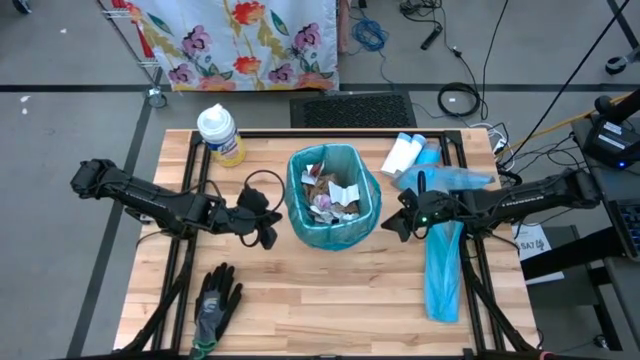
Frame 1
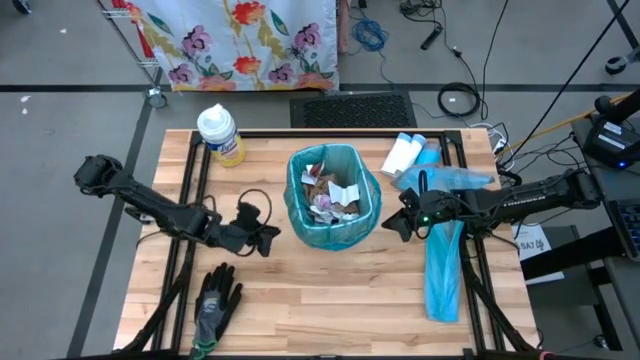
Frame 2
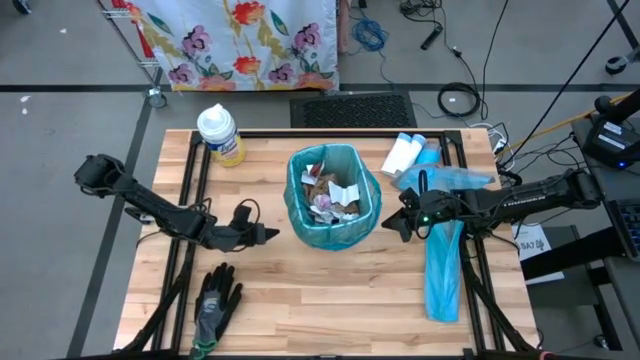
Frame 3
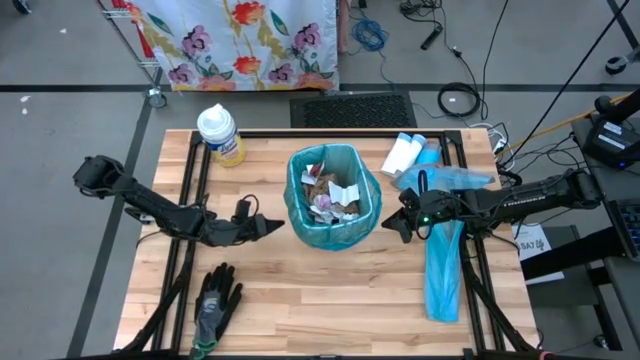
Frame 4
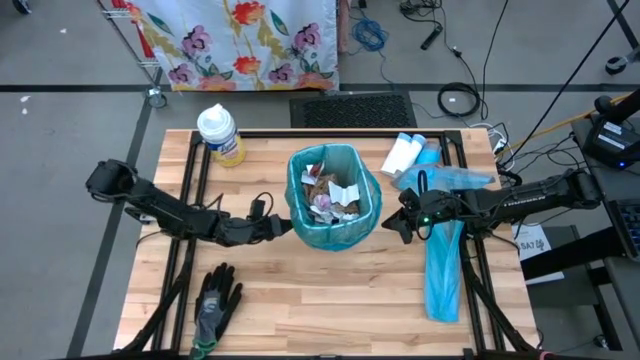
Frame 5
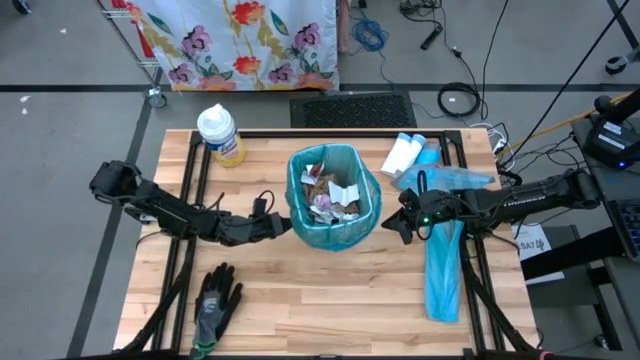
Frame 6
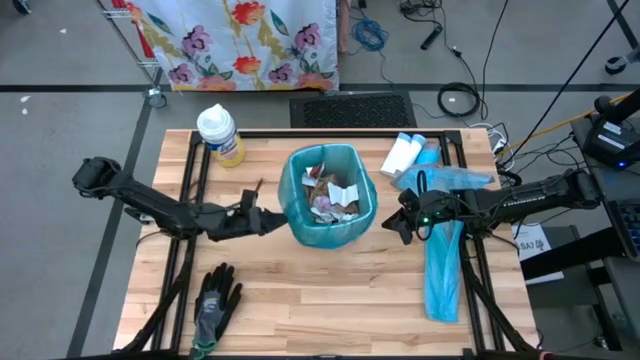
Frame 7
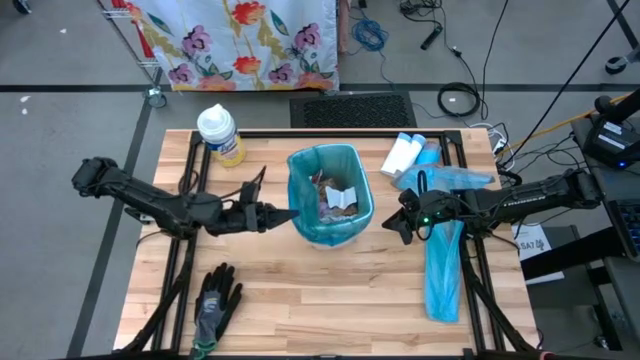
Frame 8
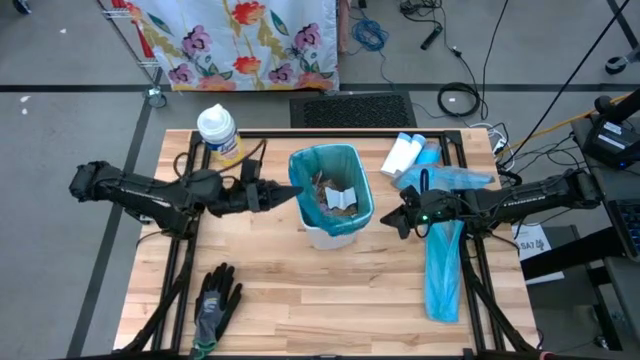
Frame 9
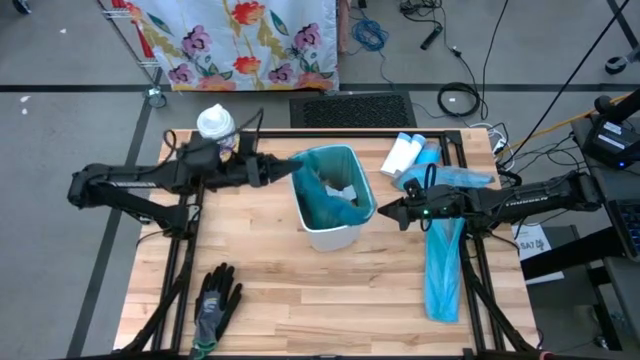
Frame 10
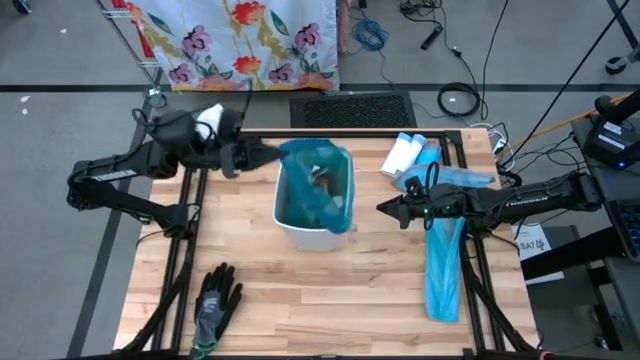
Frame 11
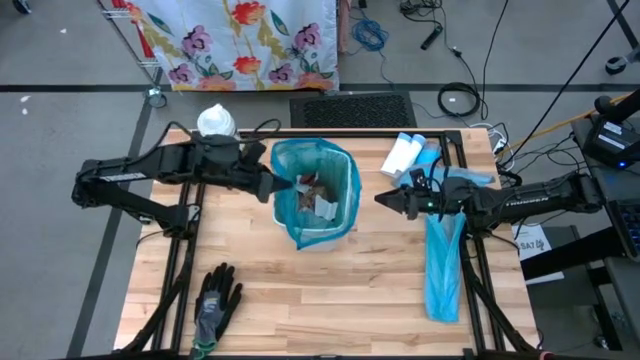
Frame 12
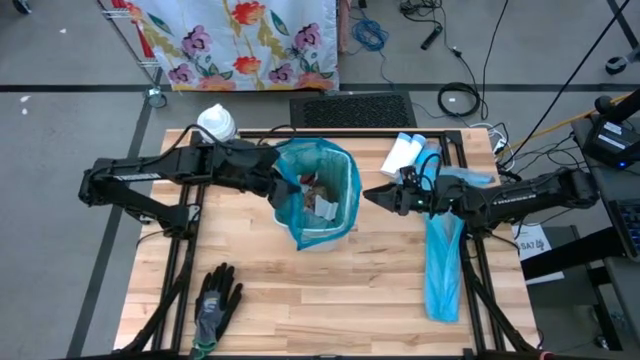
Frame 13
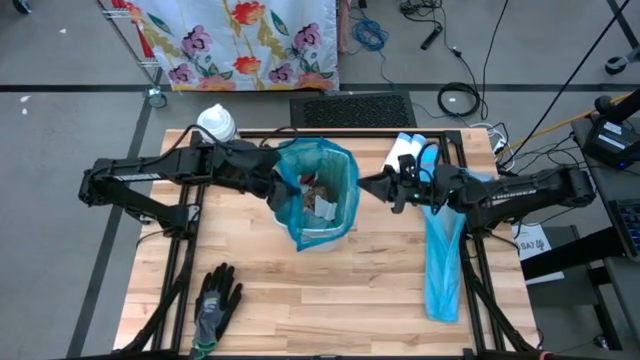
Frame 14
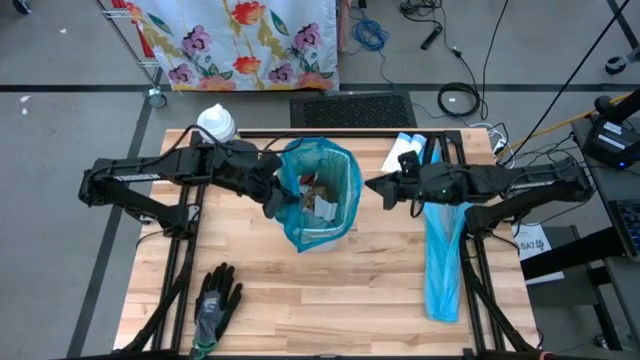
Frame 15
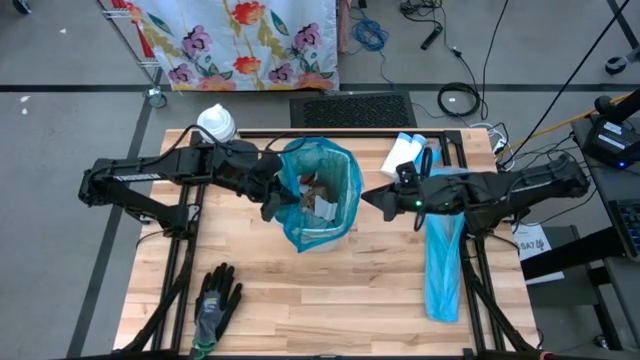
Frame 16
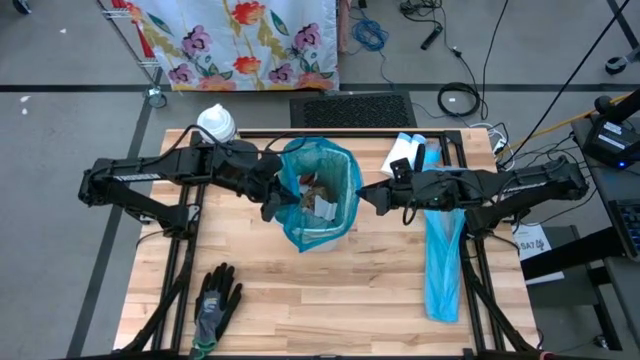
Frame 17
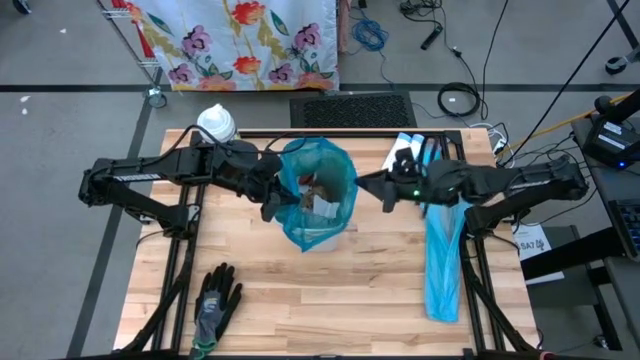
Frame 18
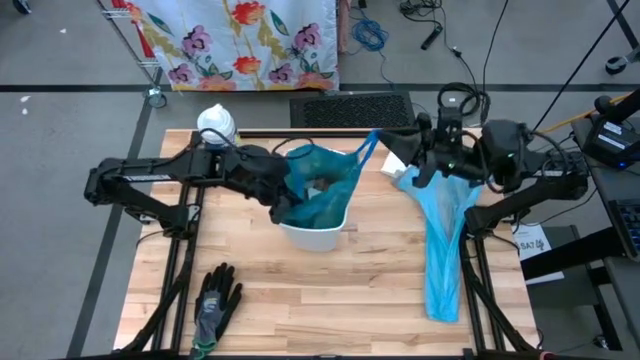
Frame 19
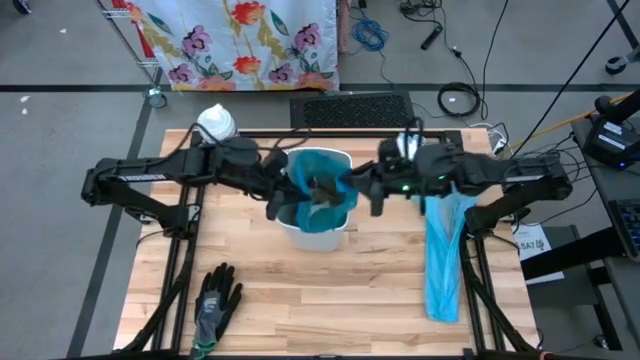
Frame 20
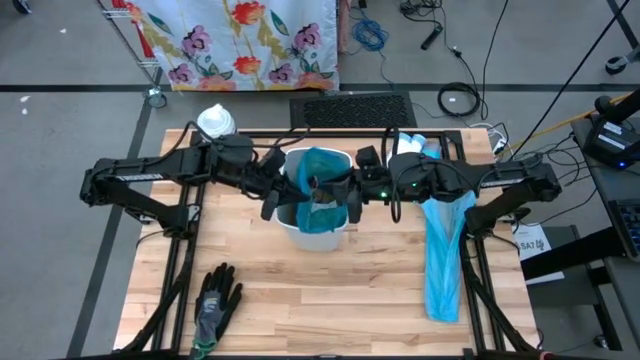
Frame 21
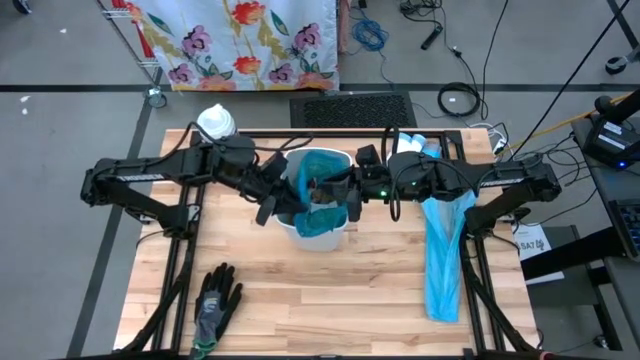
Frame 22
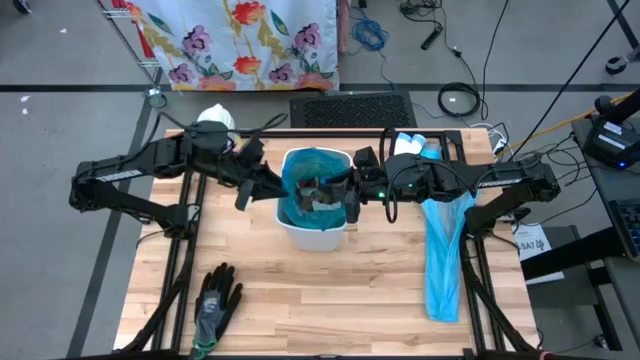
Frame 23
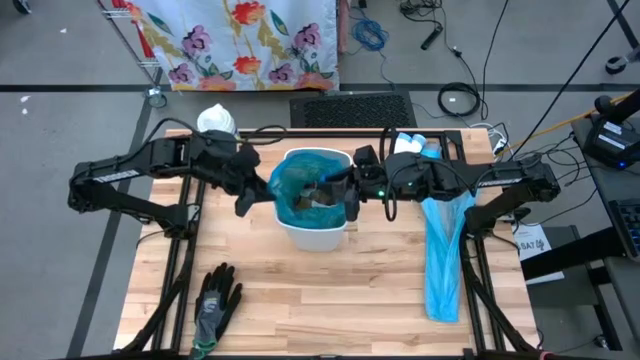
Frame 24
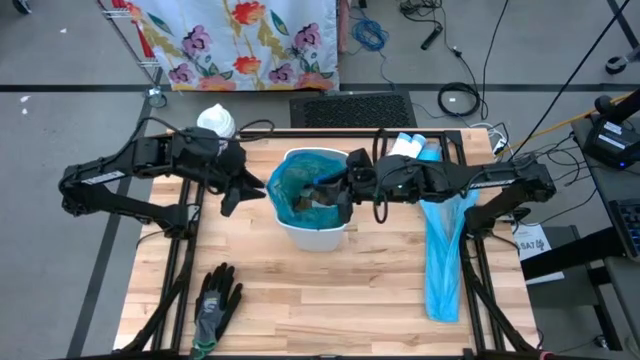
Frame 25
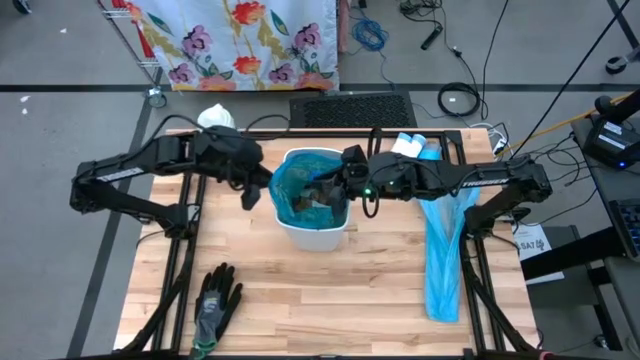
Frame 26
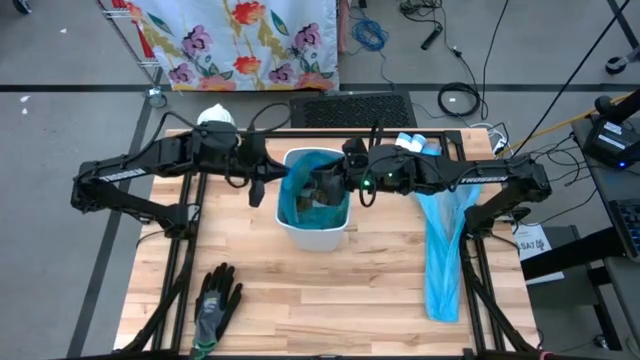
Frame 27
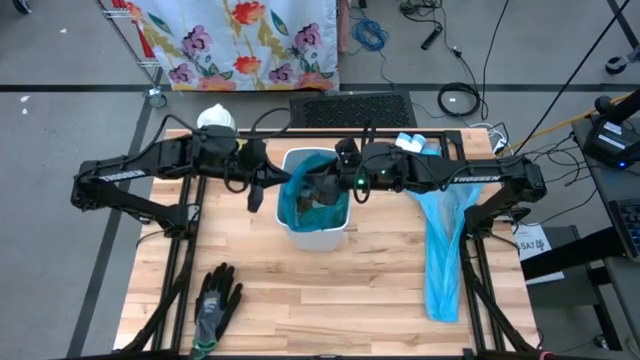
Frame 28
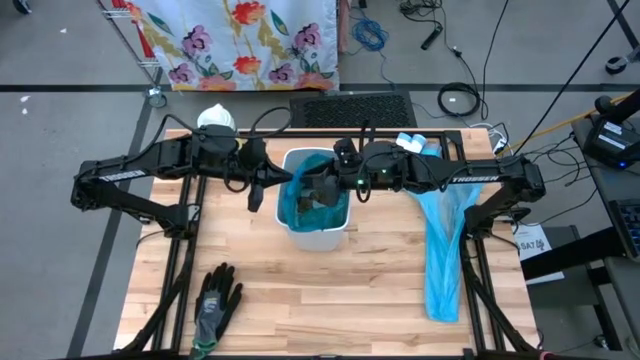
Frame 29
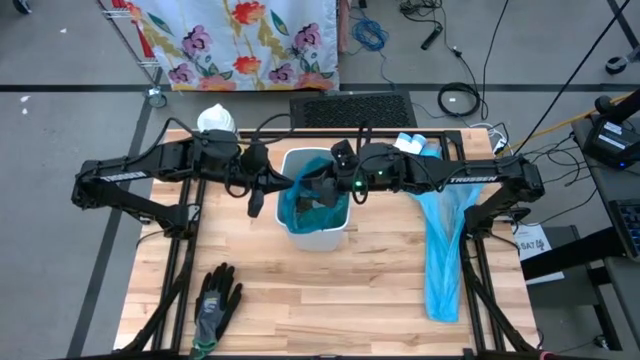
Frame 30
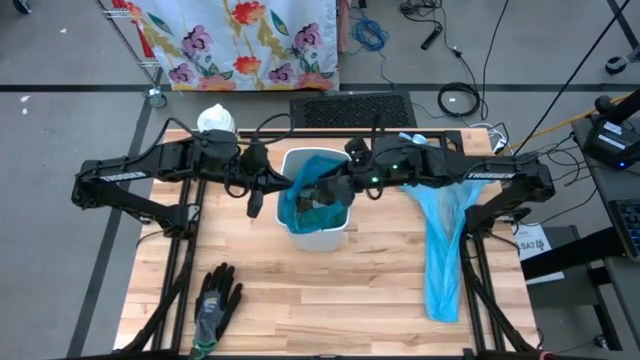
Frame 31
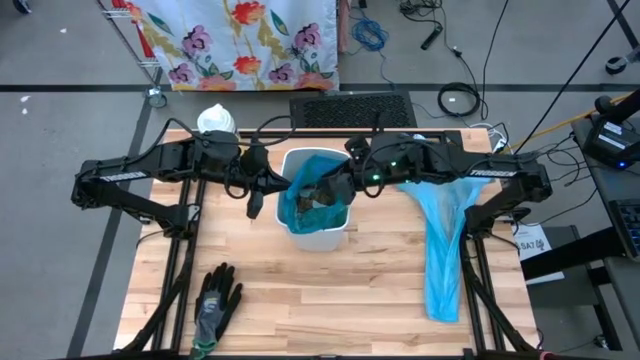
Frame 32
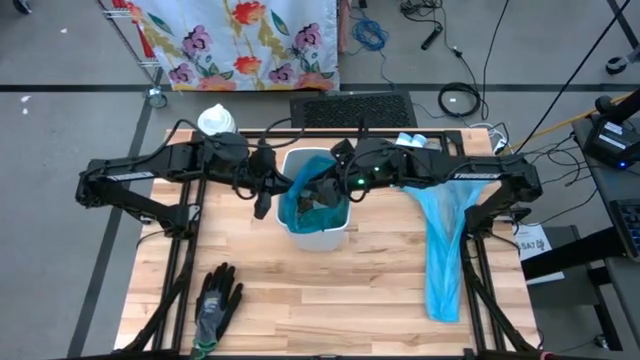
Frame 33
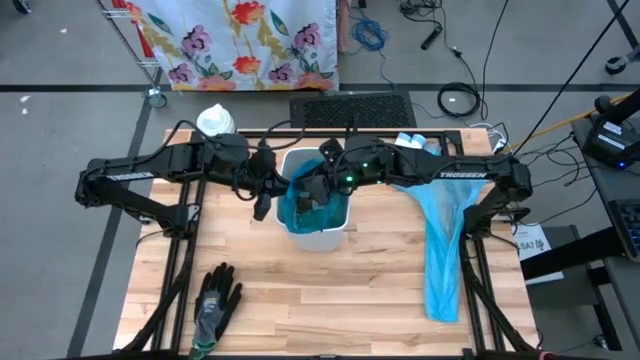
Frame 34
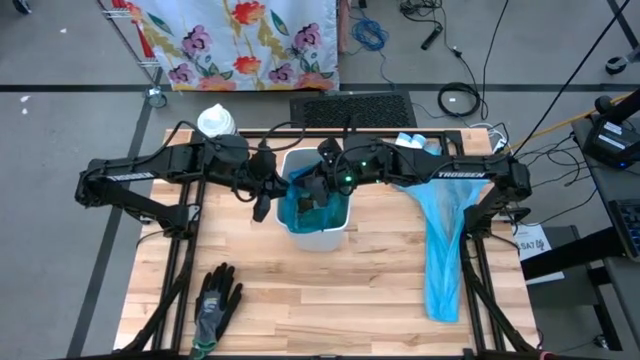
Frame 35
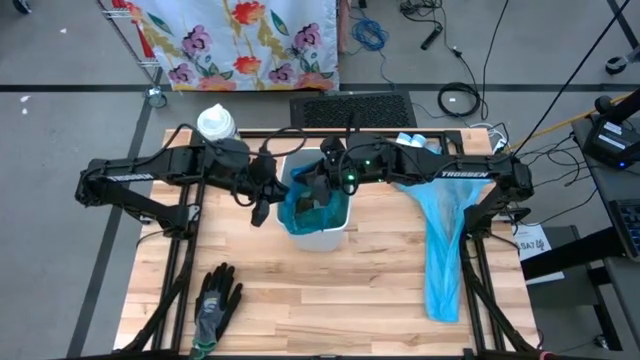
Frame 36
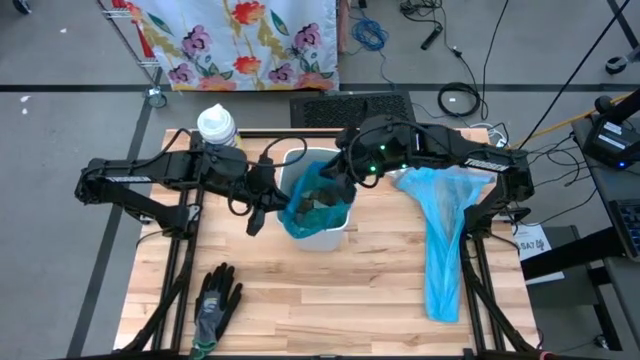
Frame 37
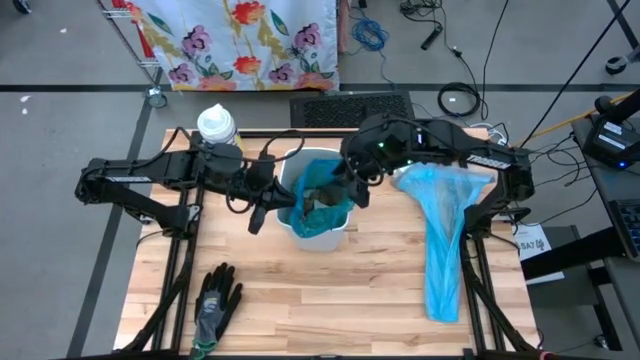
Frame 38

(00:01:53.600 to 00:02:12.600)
Task: place trash/remove bag and relplace
Close the blue trash bag

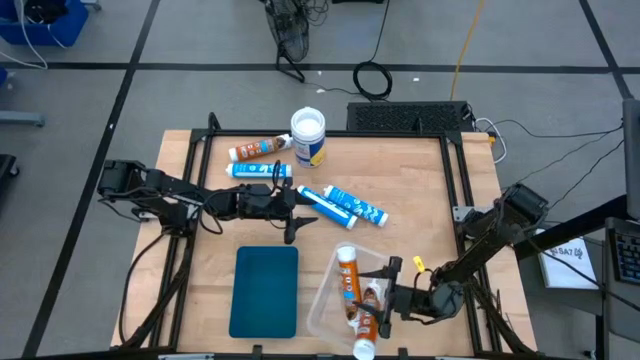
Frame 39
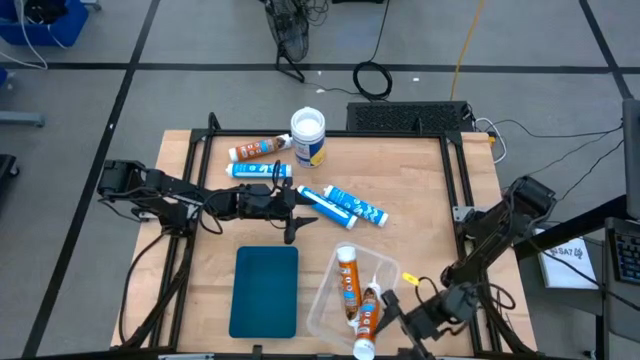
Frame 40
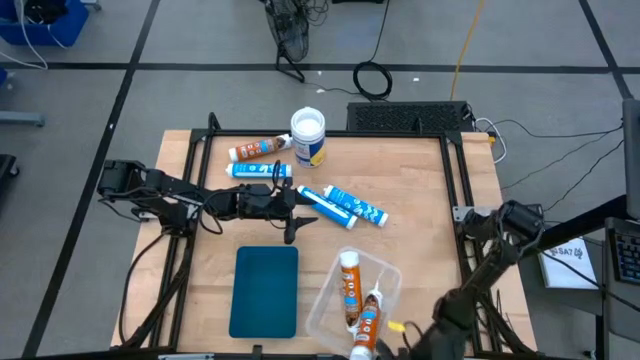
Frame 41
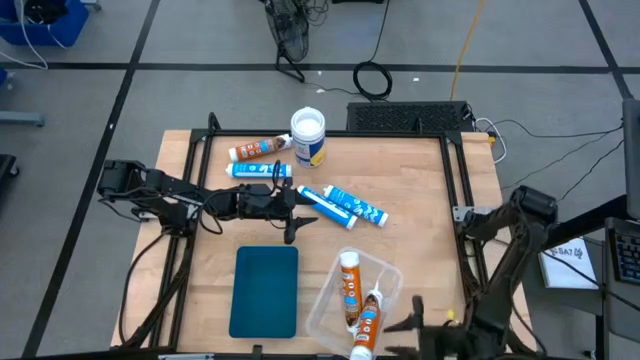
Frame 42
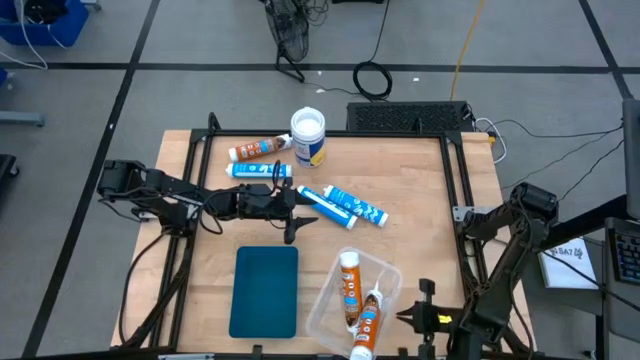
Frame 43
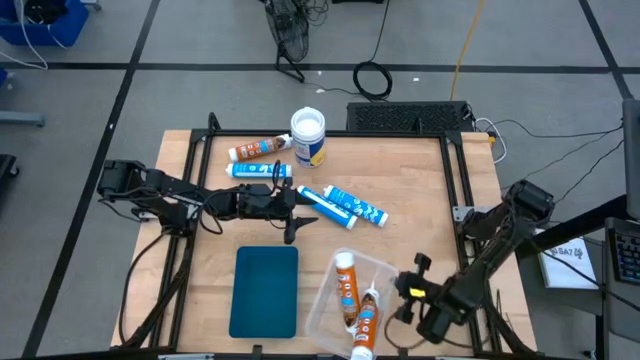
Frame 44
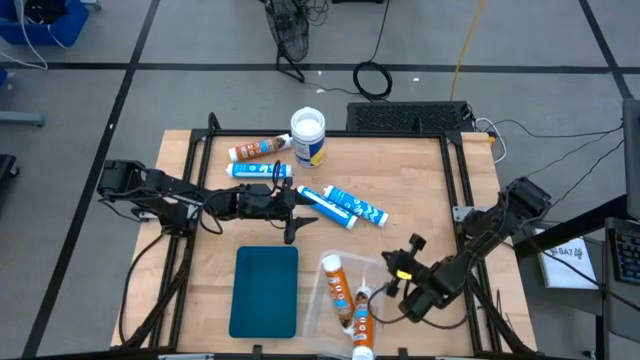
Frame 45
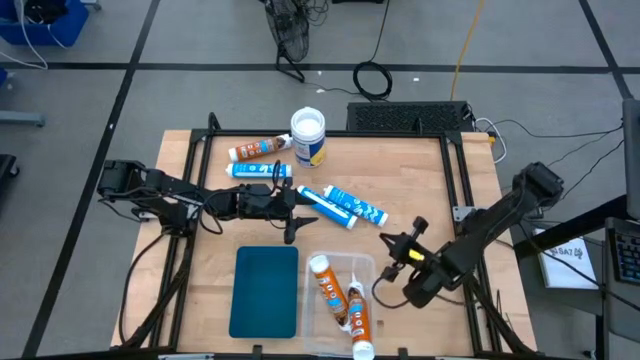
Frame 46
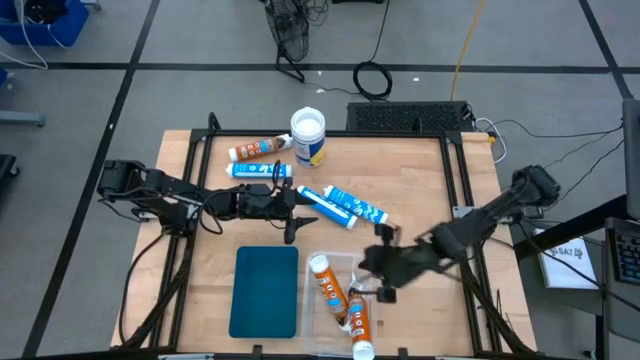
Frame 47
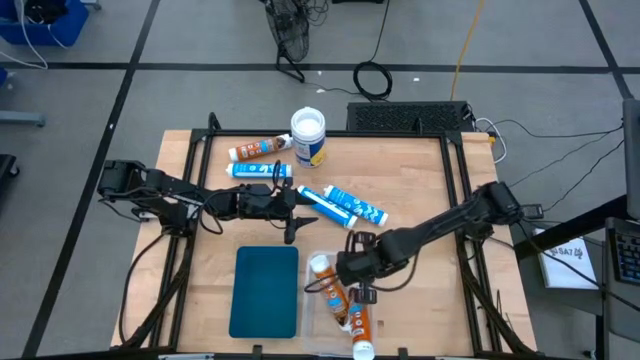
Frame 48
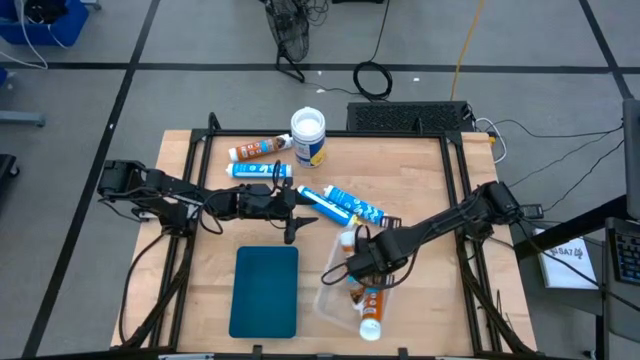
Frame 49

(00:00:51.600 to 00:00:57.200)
Task: Pick & place silicon tubes, Sealant and Lysol wipes
Adjust the white bin
